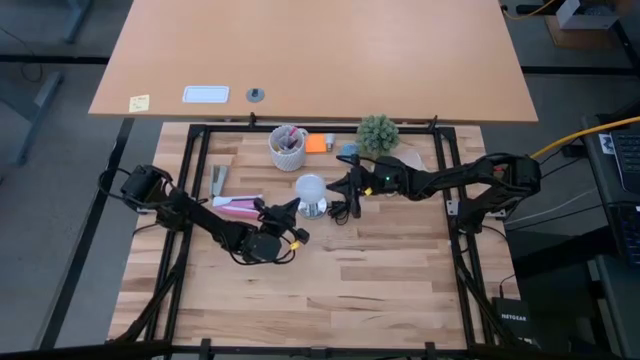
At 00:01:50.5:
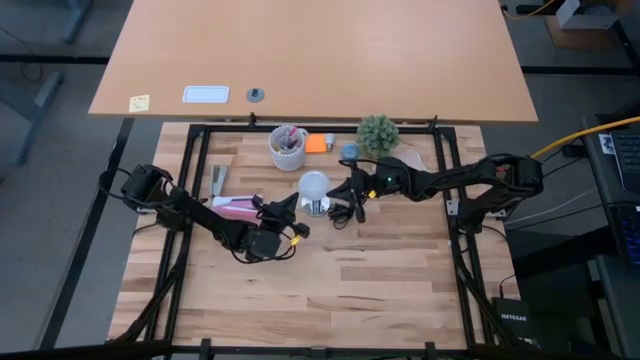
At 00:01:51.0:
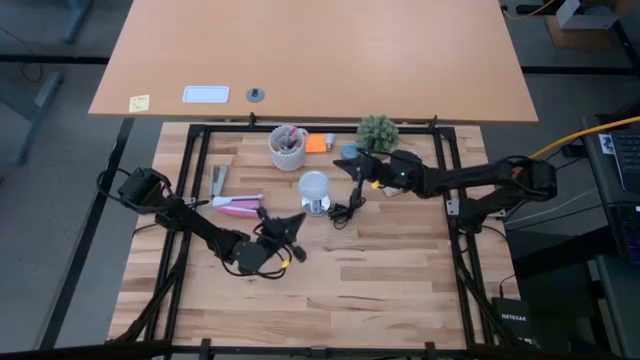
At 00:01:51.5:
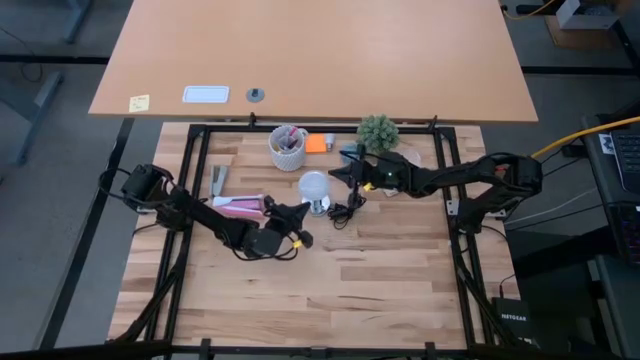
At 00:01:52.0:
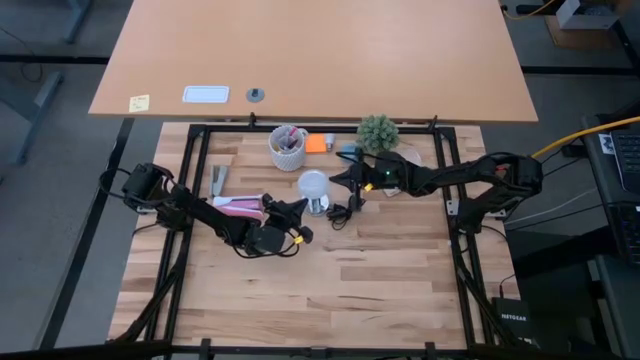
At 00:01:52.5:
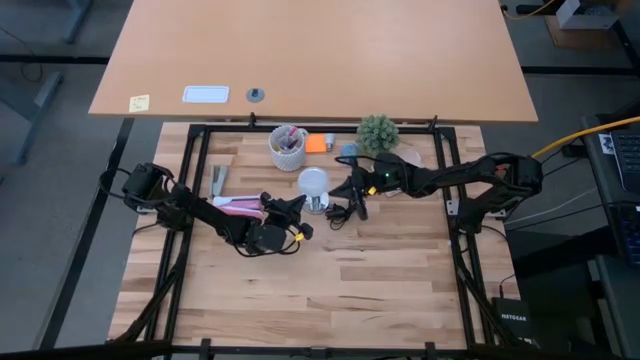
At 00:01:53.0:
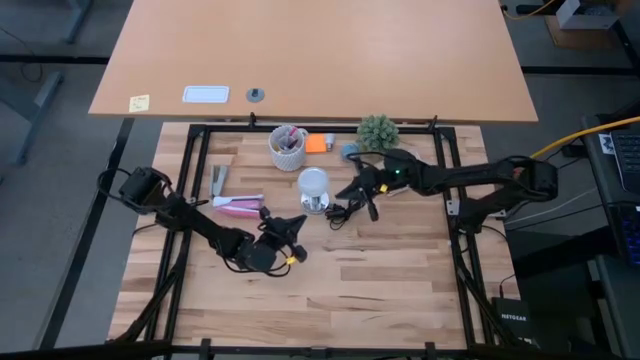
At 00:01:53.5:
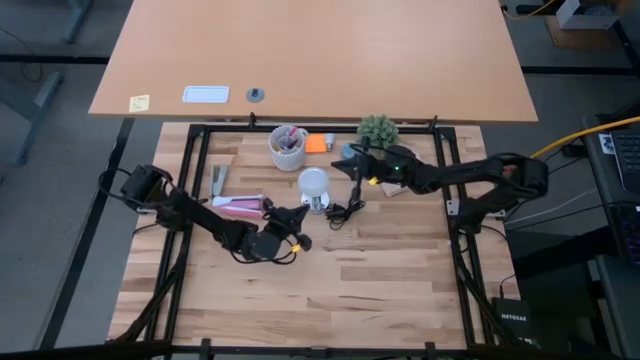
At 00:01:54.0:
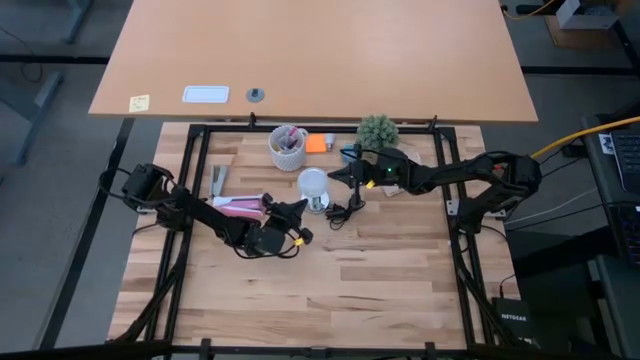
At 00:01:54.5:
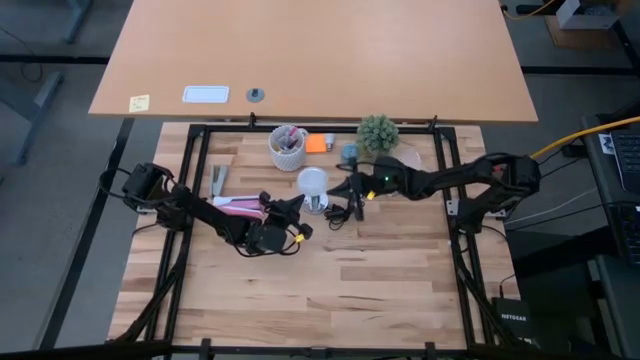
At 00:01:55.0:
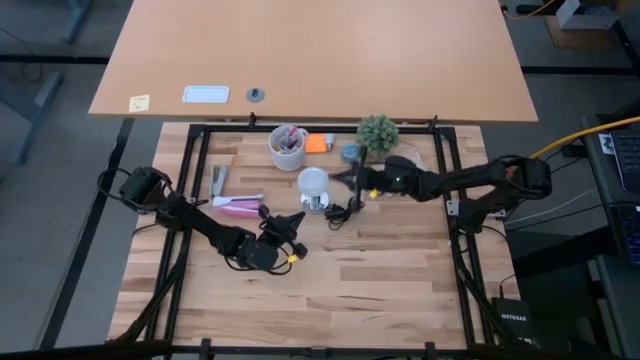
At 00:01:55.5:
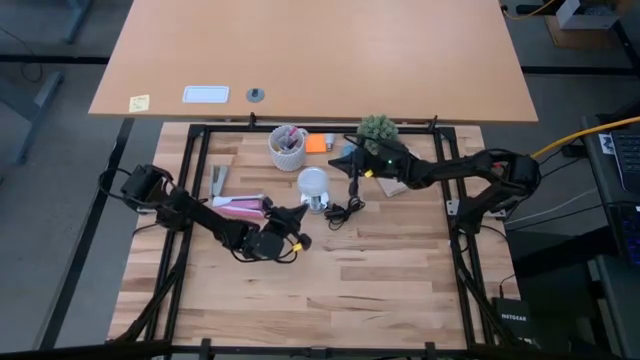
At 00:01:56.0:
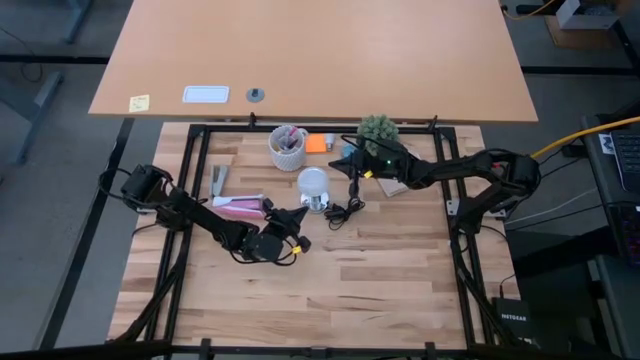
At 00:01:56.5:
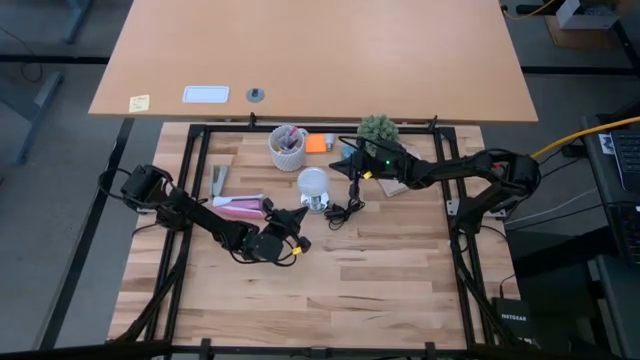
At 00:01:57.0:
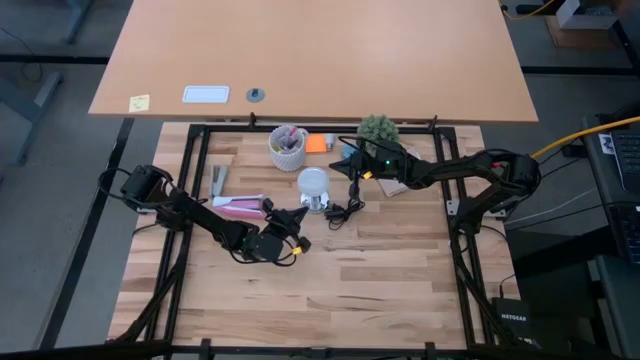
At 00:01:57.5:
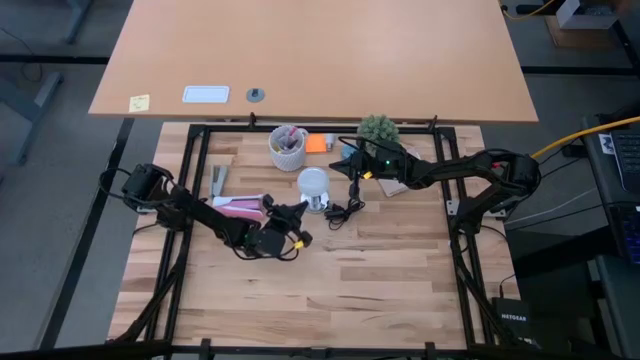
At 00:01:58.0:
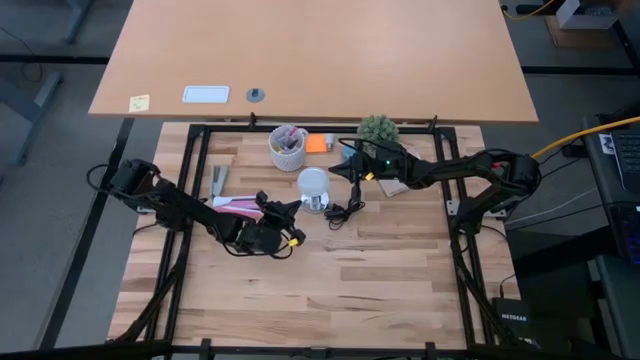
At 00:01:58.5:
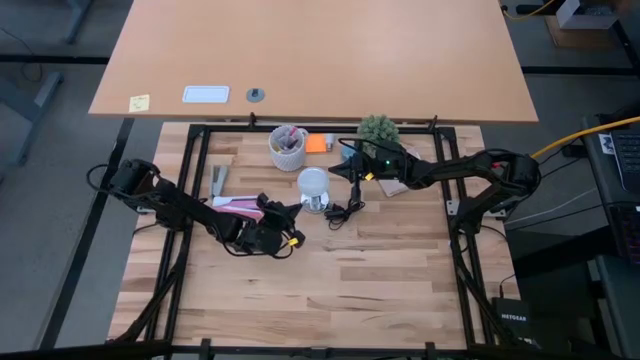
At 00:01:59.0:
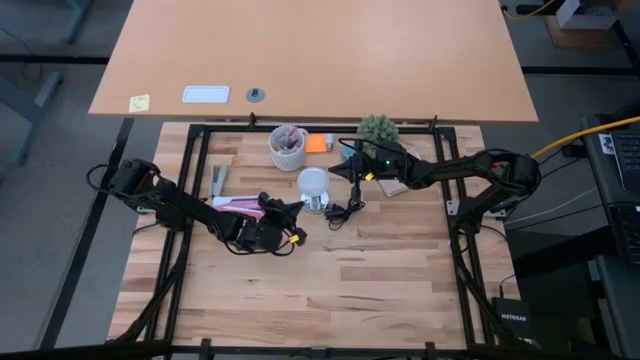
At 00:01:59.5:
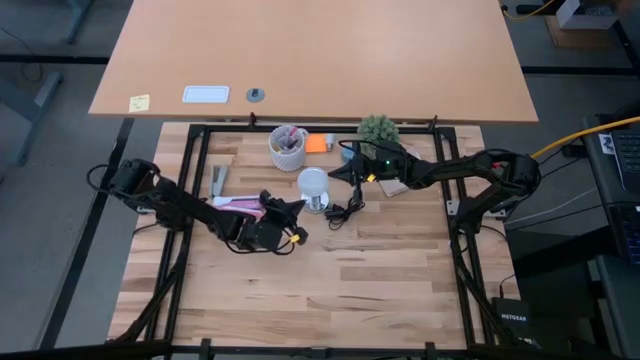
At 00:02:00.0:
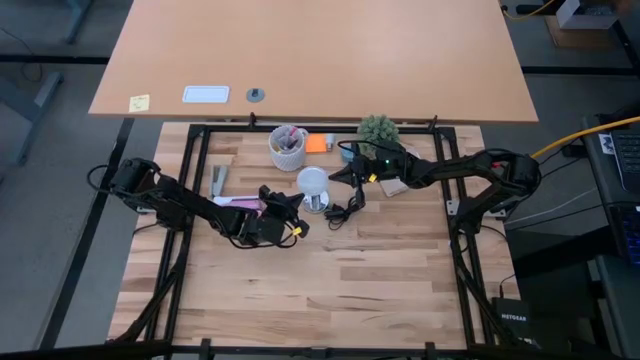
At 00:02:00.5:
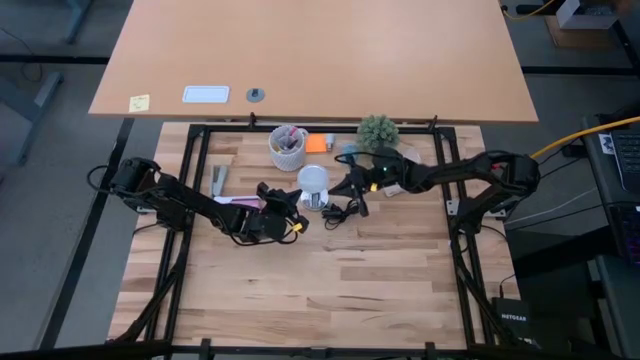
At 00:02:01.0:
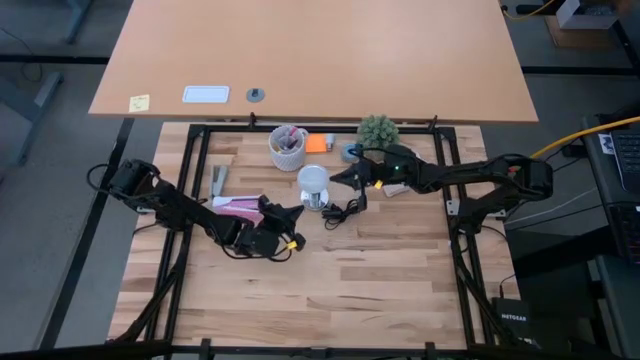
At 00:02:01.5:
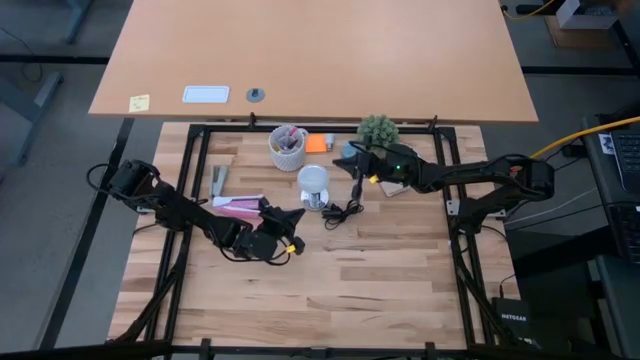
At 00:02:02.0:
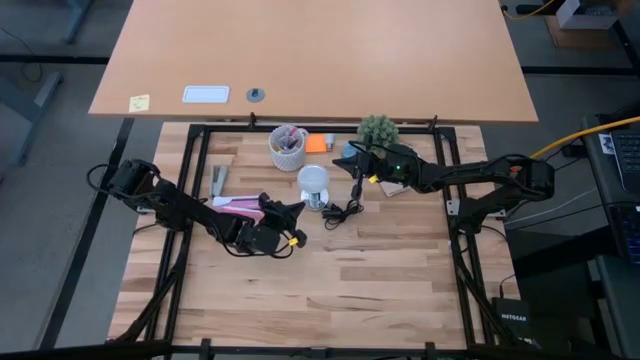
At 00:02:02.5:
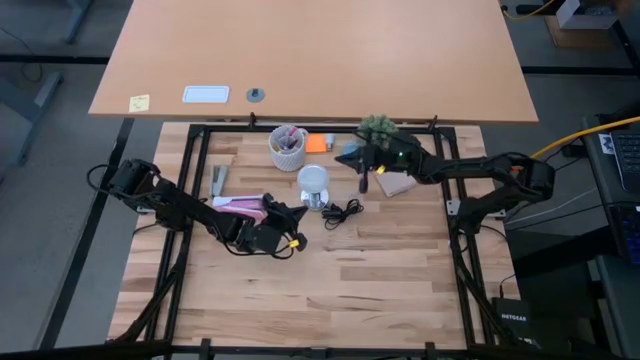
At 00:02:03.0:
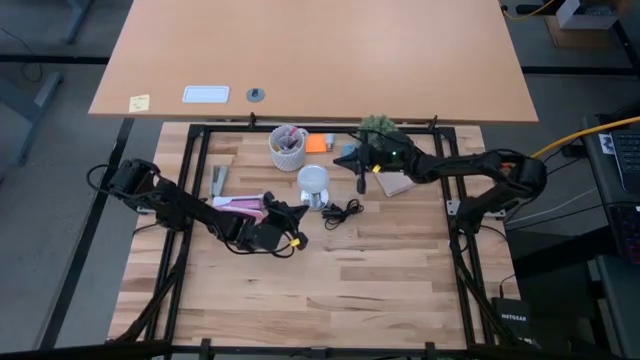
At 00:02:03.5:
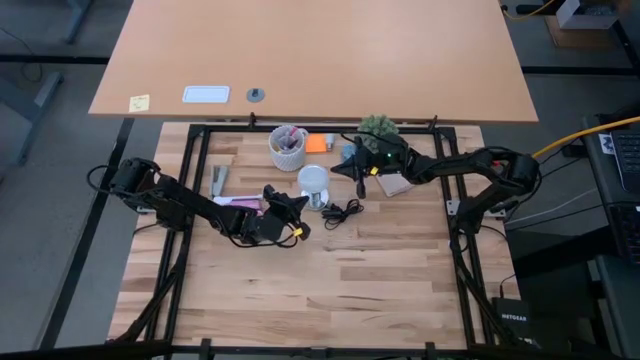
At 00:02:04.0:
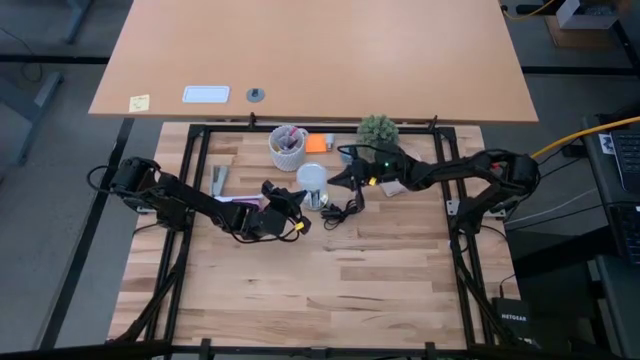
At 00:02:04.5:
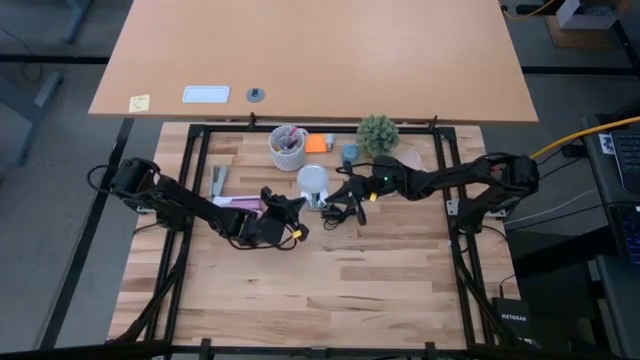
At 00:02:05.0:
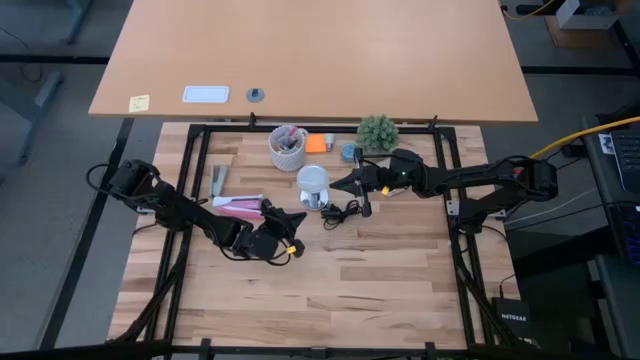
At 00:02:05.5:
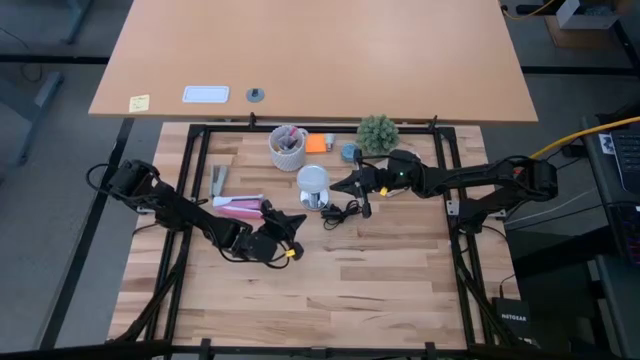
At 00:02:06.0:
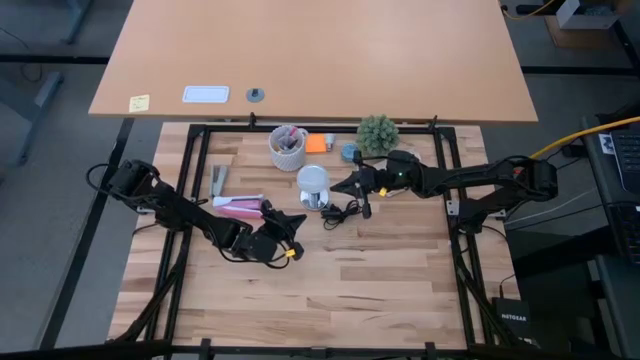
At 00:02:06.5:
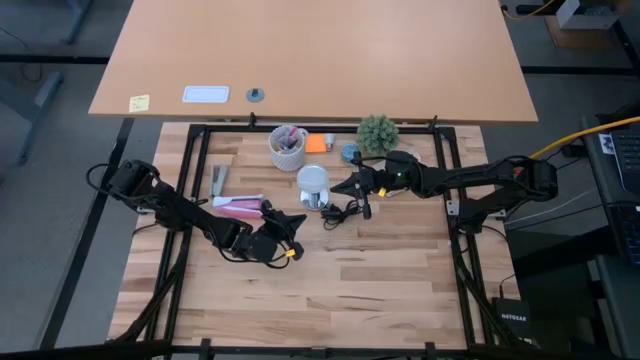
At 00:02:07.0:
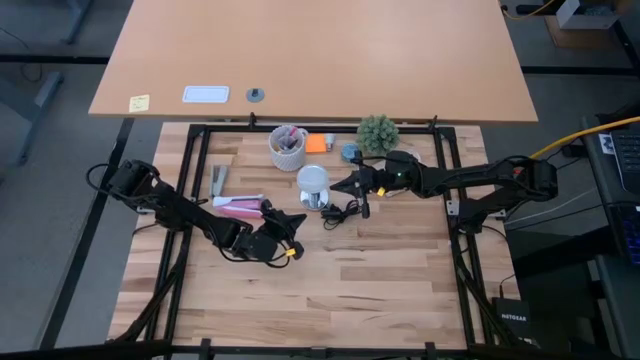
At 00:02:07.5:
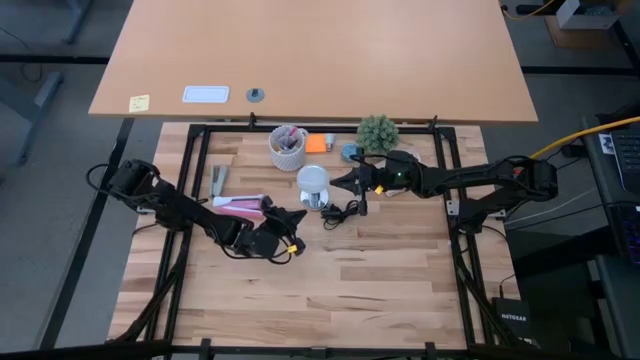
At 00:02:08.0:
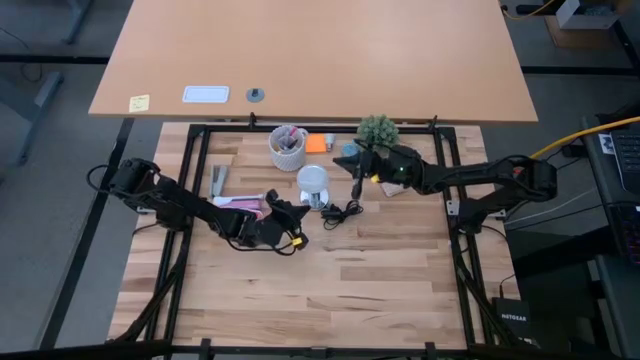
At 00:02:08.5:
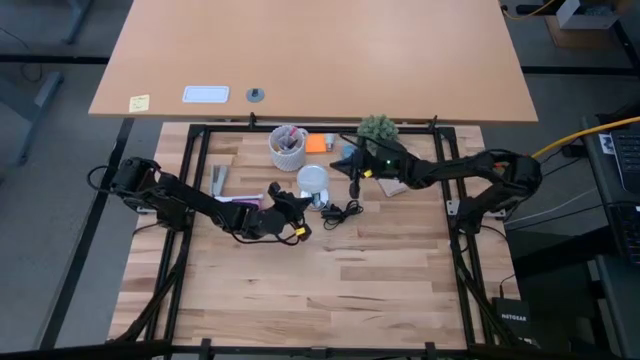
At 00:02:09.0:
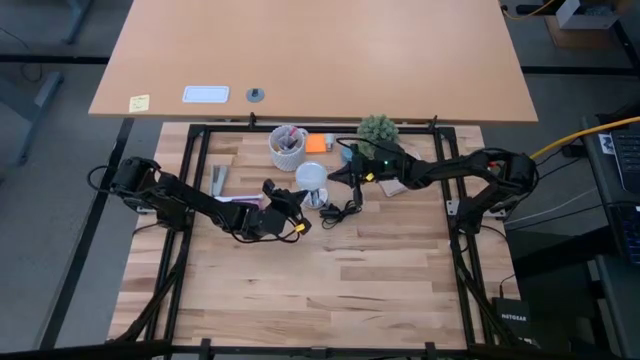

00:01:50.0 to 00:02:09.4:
Task: Screw lightbulb
Insert the white light bulb into the silver lamp
